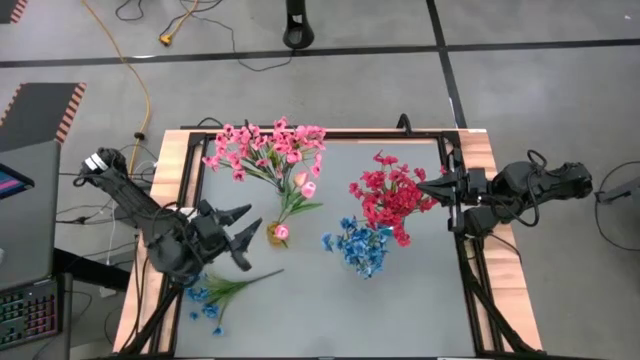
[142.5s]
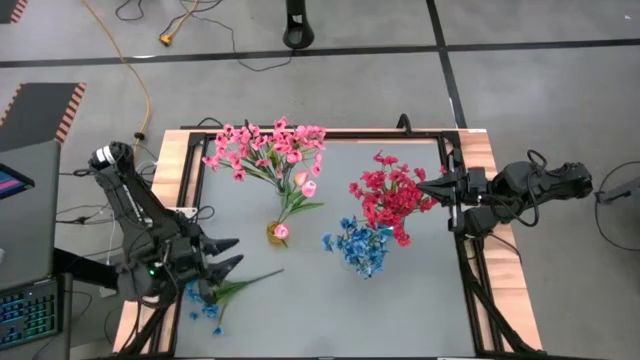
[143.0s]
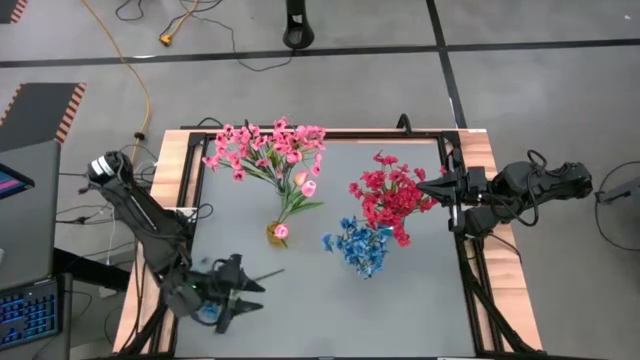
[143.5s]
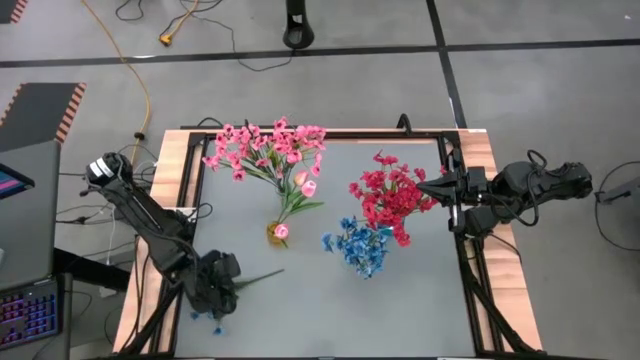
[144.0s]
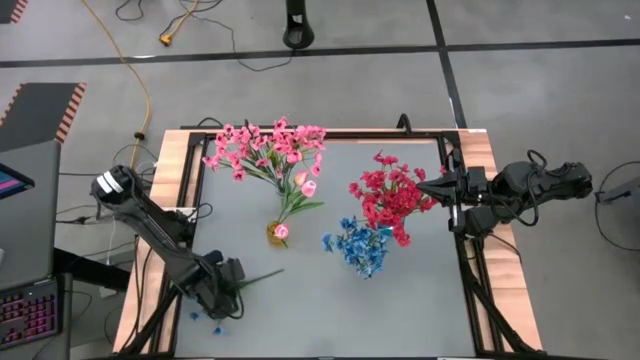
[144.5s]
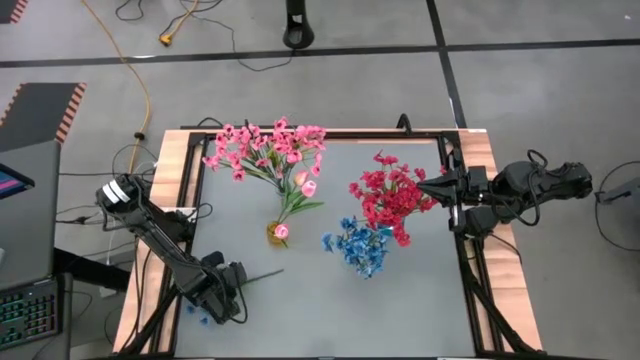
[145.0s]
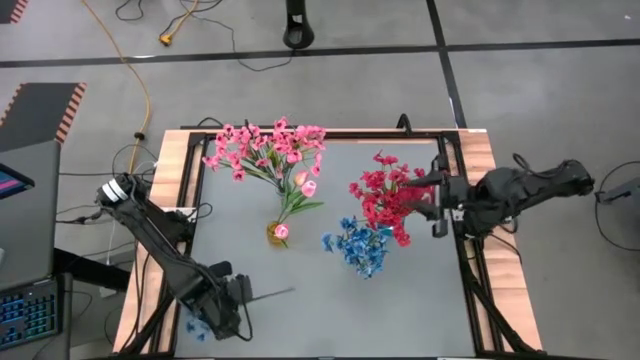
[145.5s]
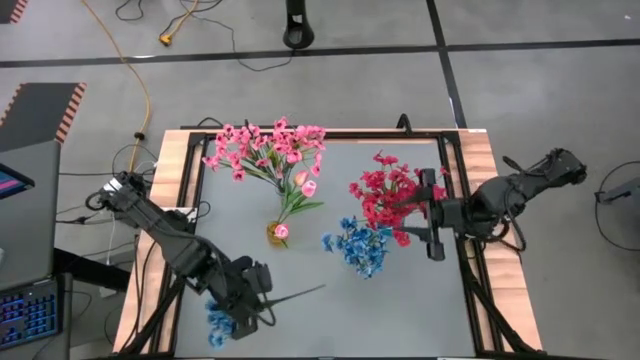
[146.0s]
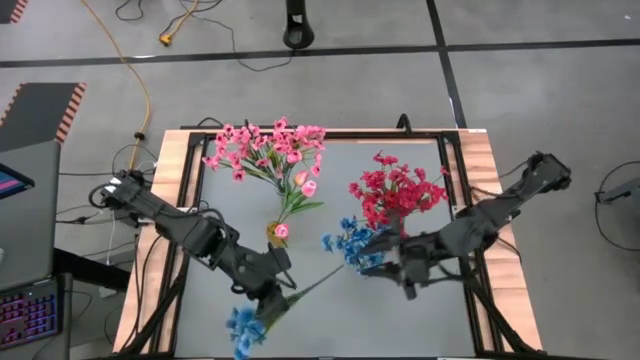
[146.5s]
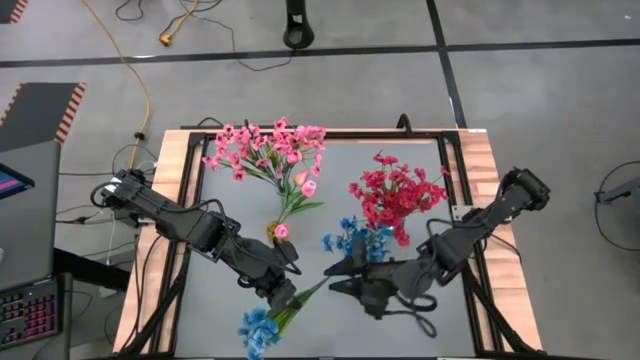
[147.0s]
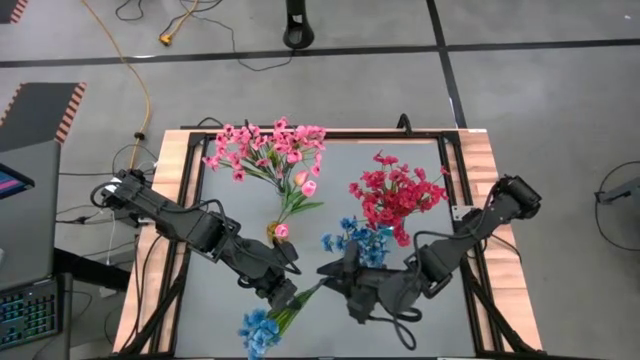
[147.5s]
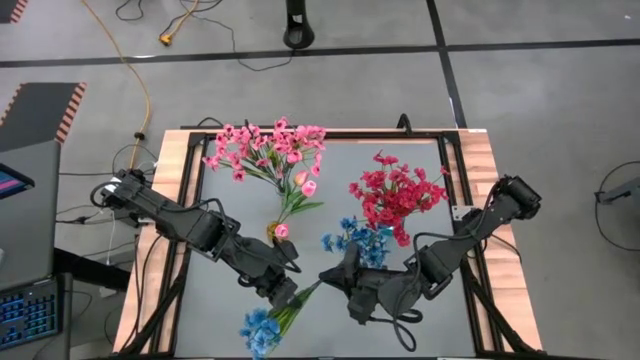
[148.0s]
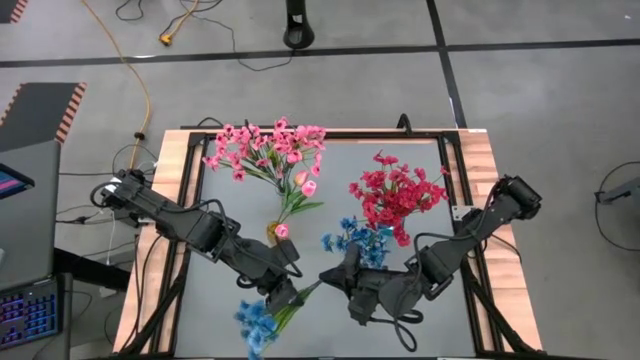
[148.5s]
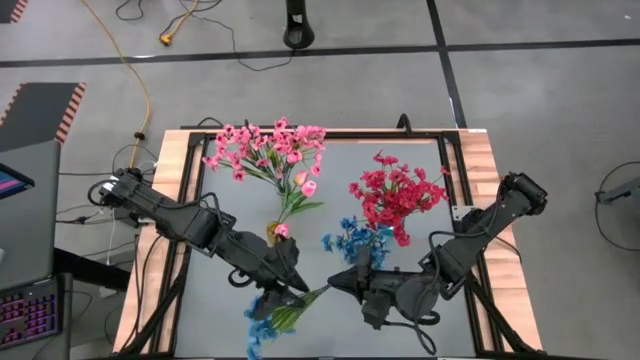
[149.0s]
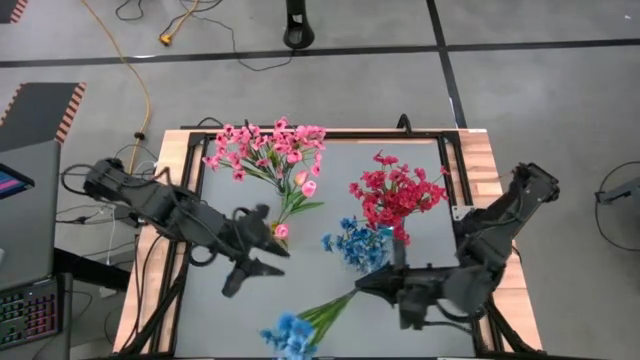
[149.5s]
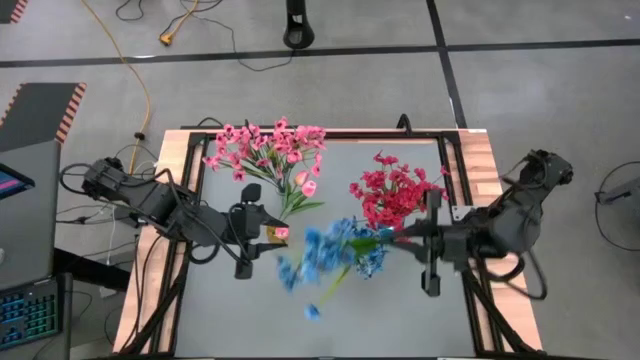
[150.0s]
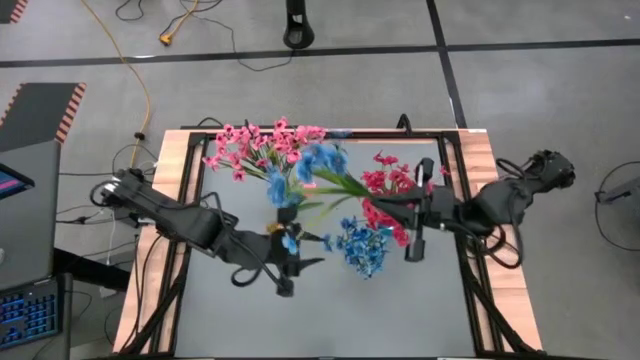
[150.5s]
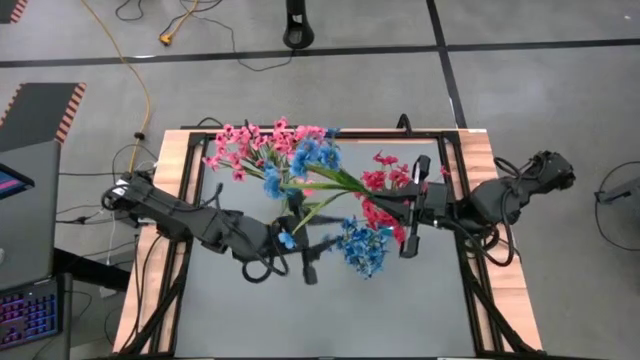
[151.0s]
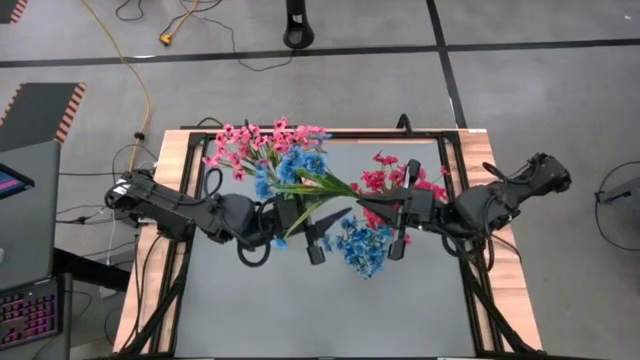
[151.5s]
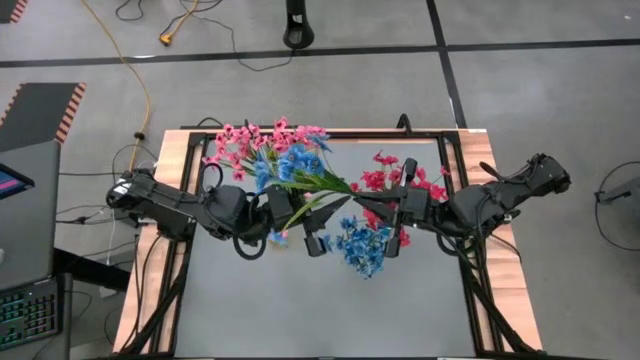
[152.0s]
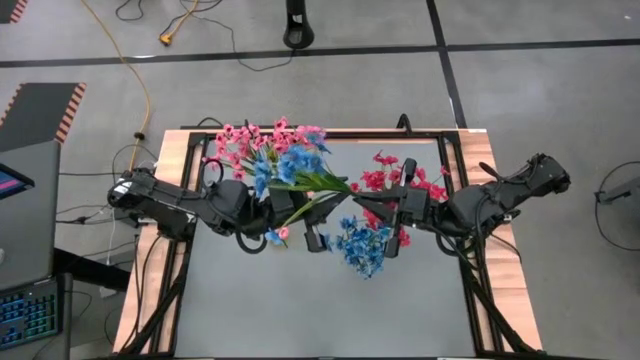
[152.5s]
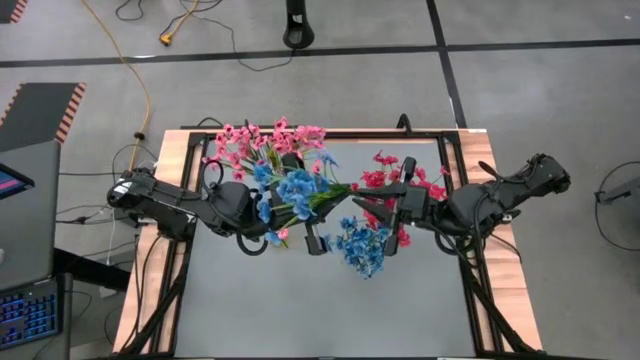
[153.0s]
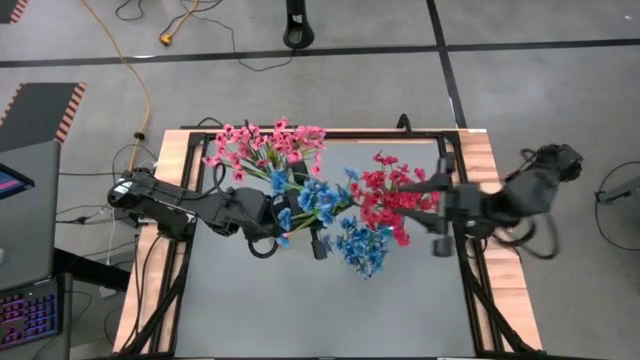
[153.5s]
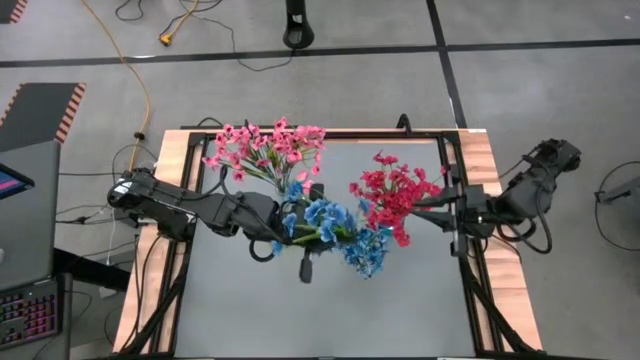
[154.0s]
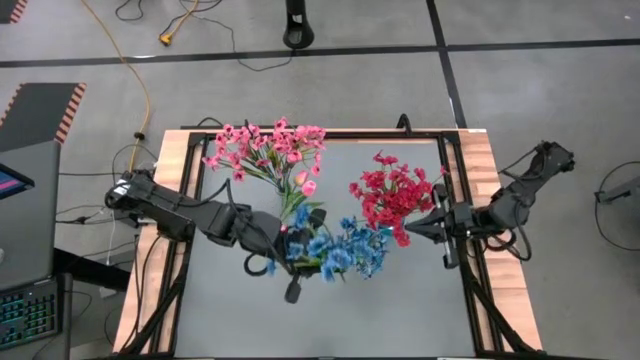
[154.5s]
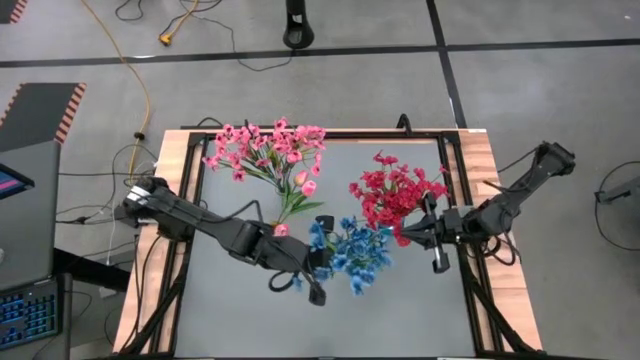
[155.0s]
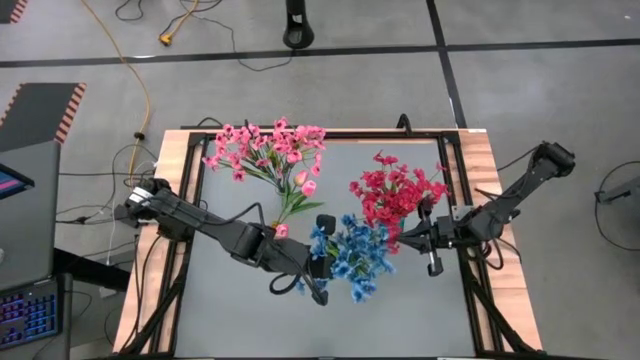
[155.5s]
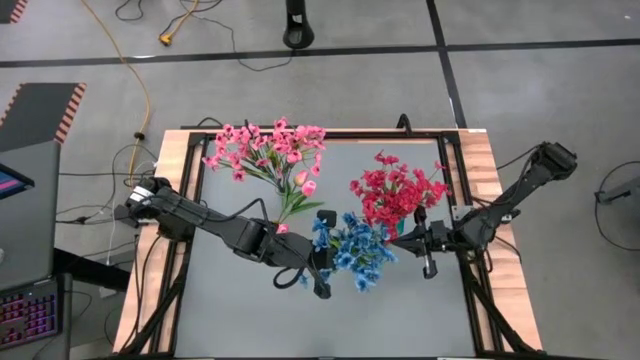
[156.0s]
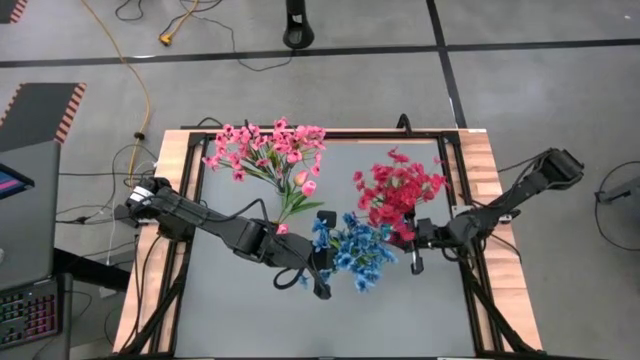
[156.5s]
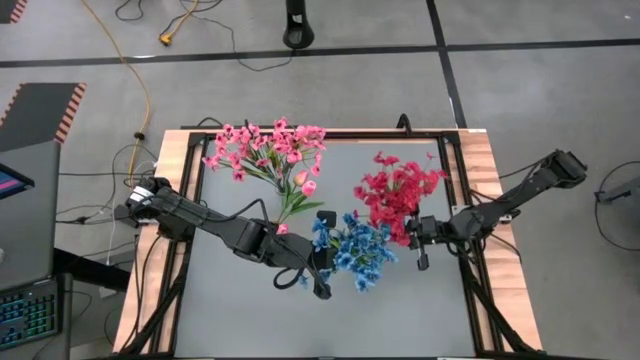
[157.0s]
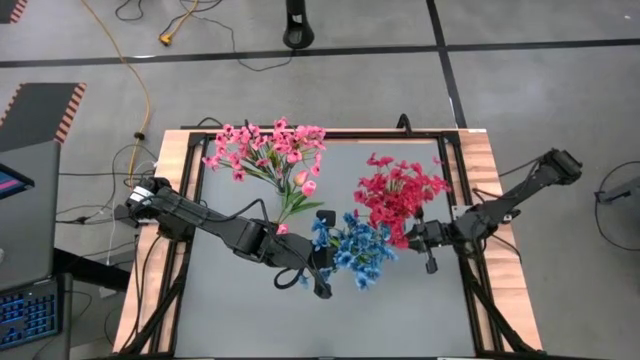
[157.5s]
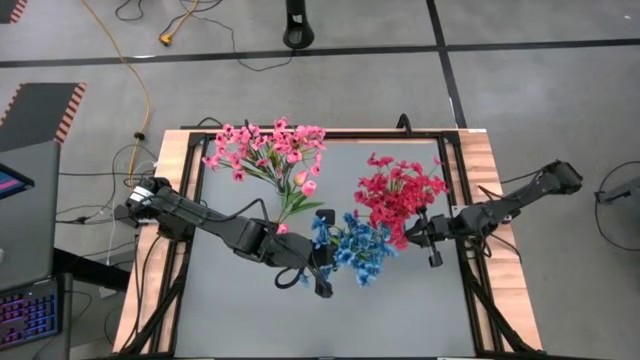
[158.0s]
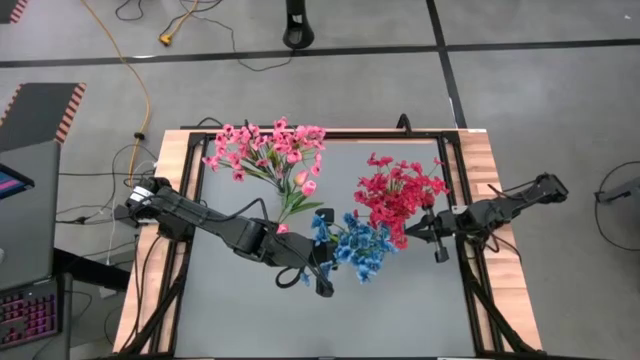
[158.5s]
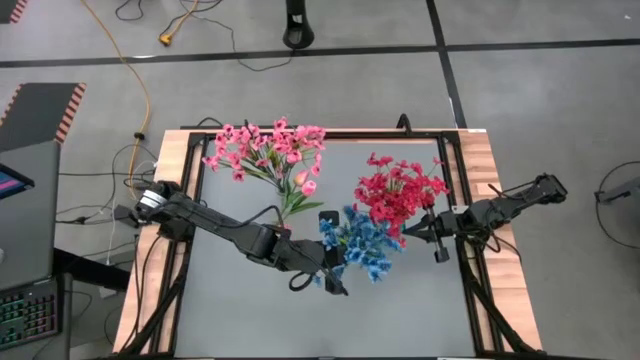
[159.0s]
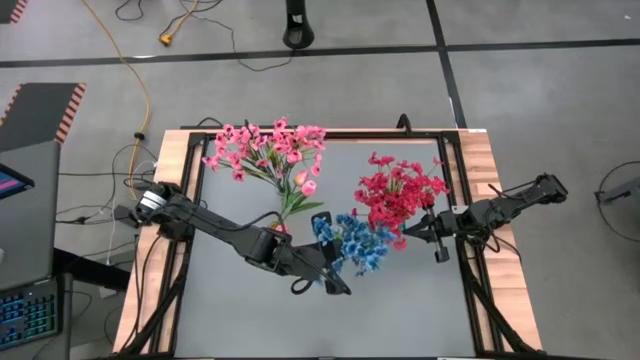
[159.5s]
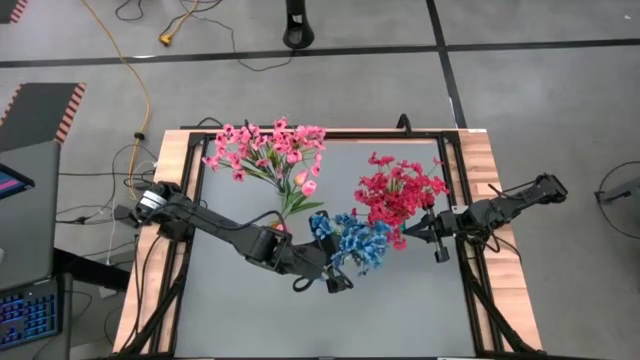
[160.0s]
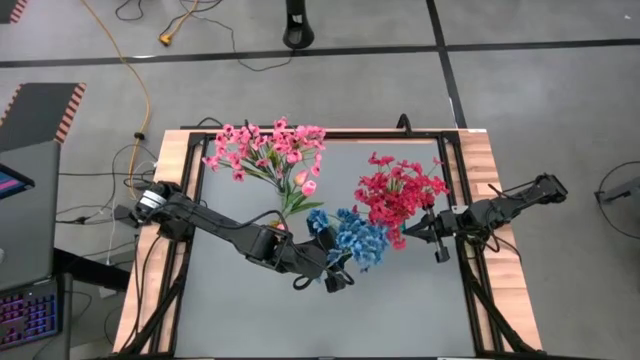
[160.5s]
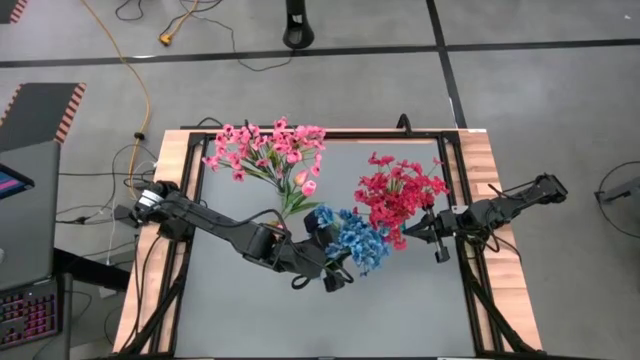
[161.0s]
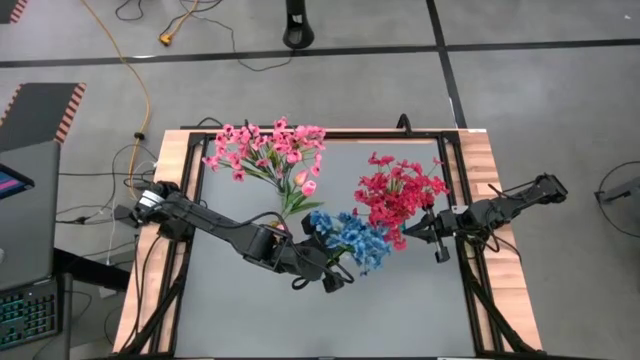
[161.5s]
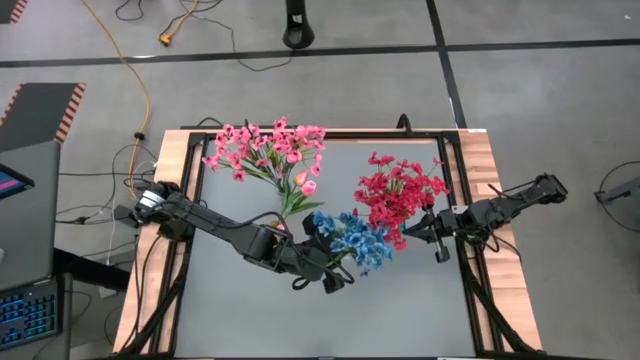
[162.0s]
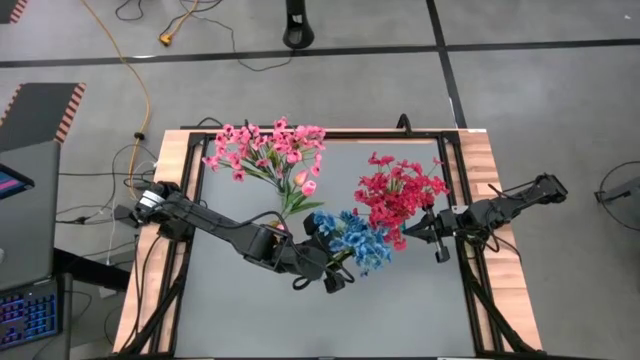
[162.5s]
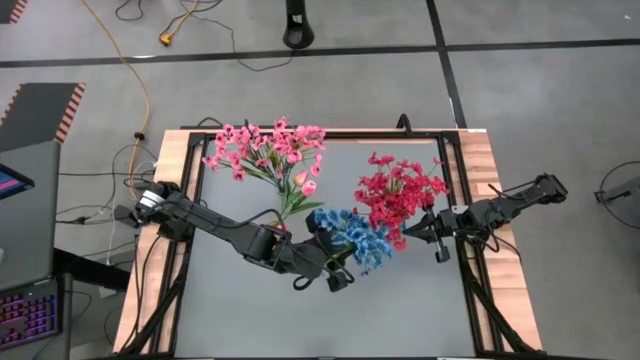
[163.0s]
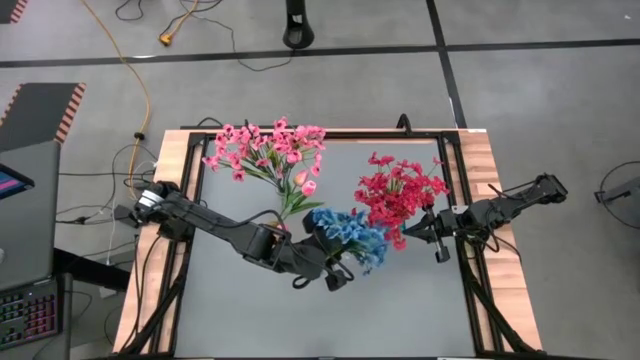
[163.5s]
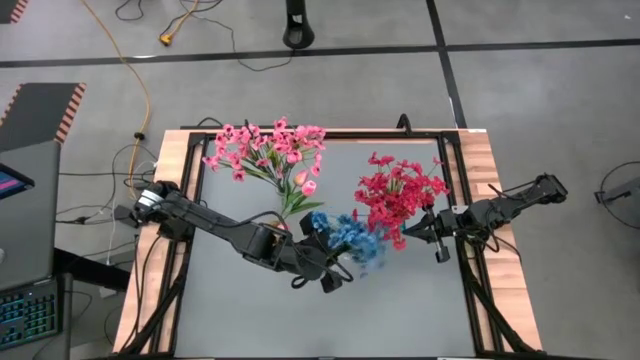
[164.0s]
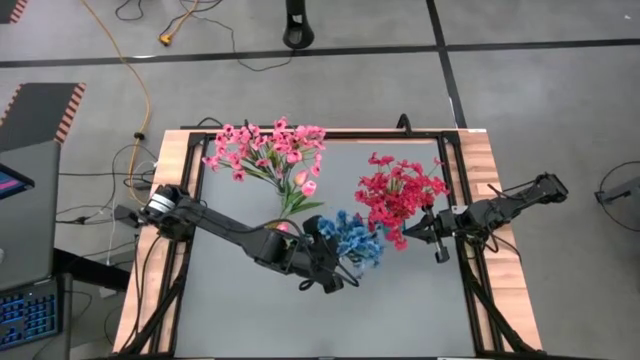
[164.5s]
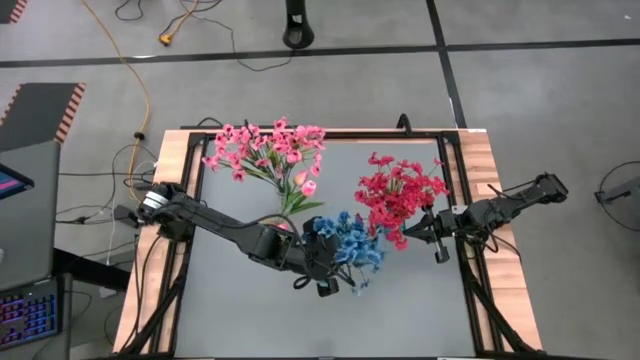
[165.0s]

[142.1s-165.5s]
Task: Sort flowers into vase by color
Put the blue flowers into the bottom transparent vase
